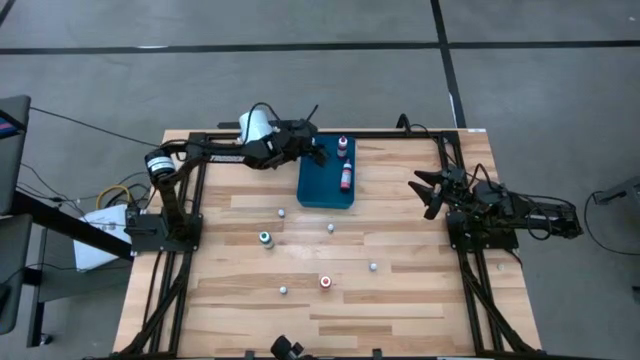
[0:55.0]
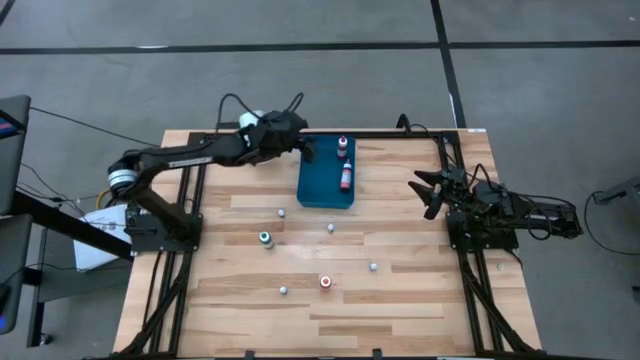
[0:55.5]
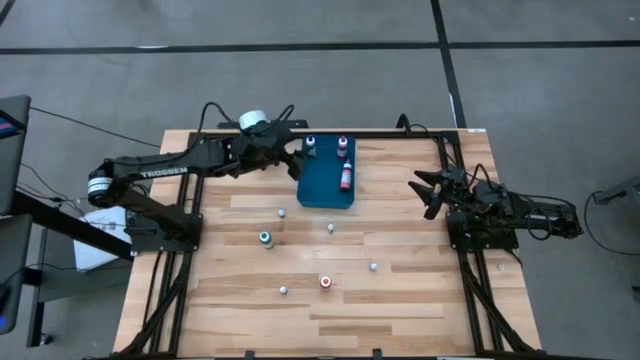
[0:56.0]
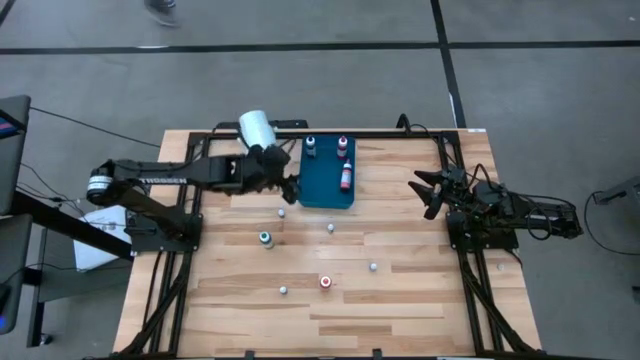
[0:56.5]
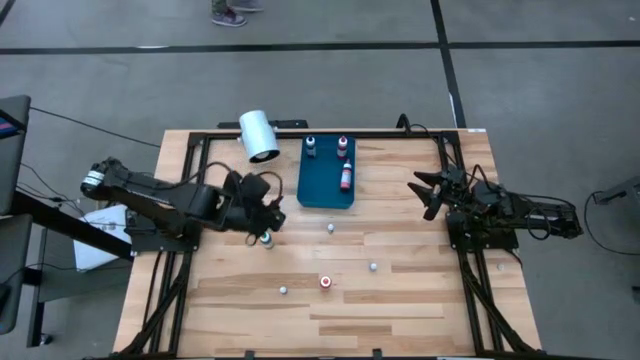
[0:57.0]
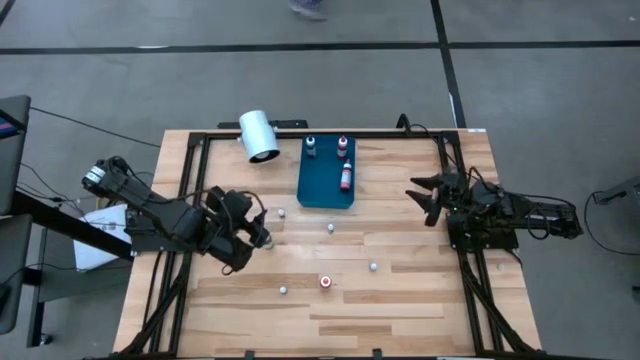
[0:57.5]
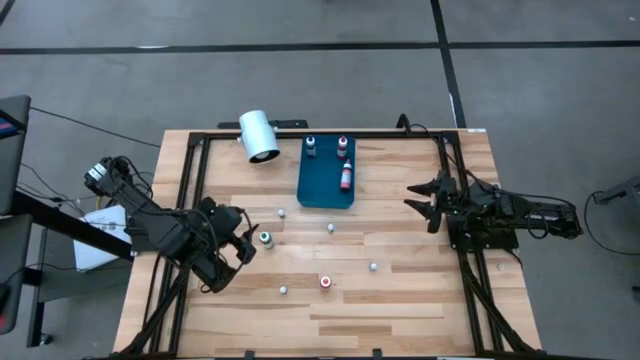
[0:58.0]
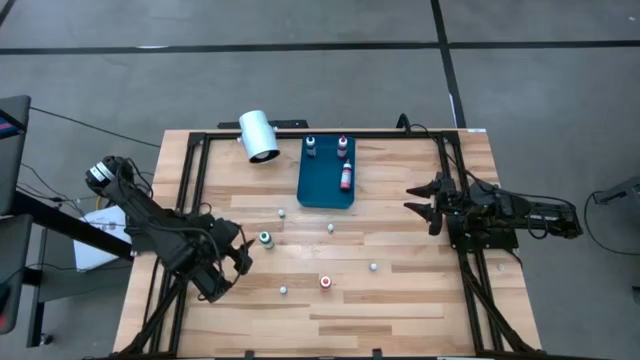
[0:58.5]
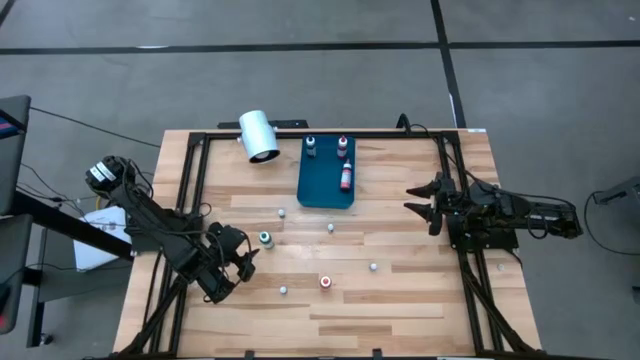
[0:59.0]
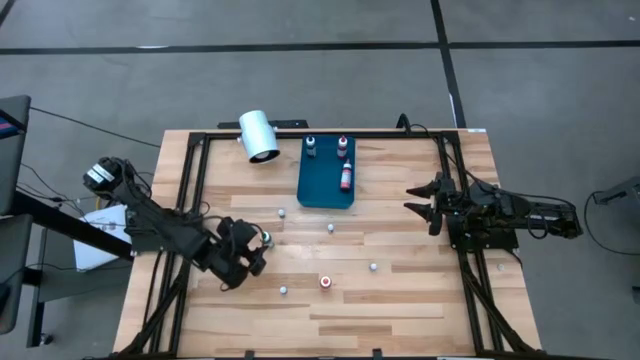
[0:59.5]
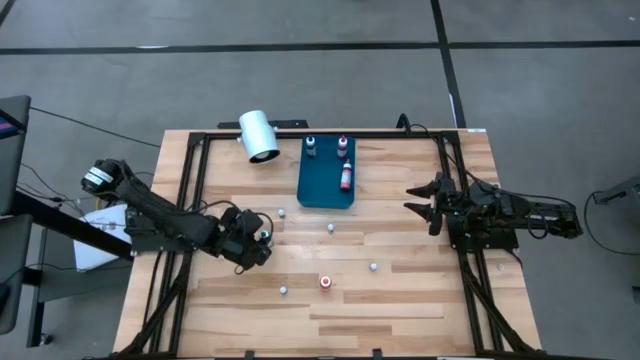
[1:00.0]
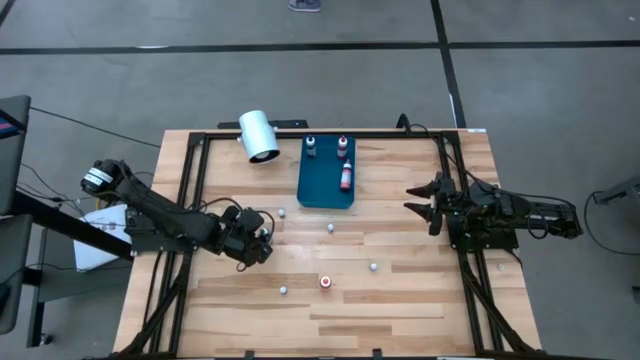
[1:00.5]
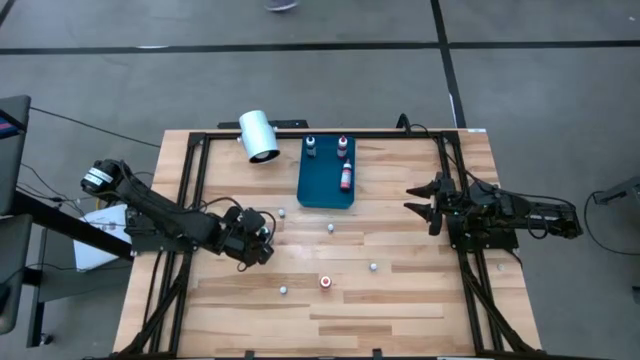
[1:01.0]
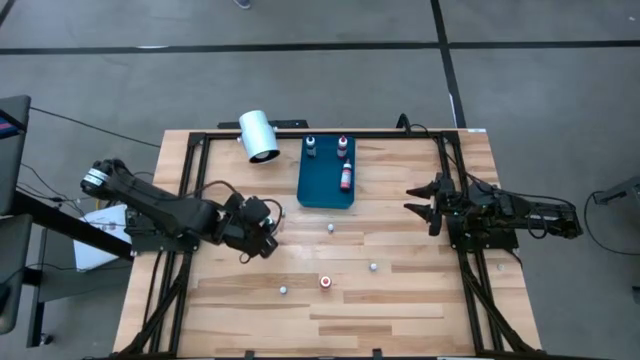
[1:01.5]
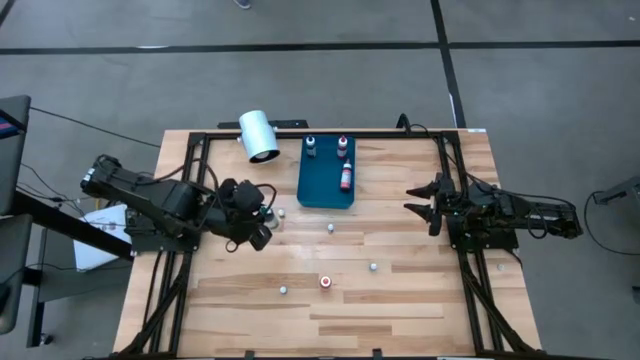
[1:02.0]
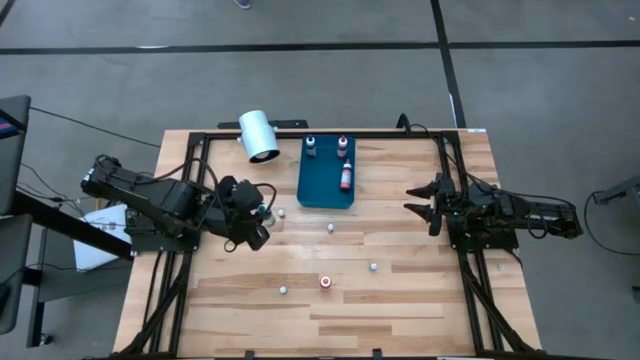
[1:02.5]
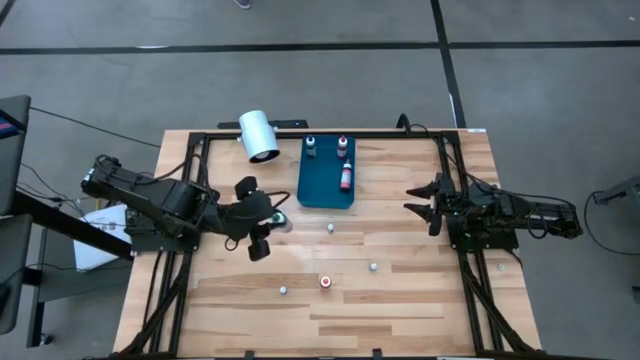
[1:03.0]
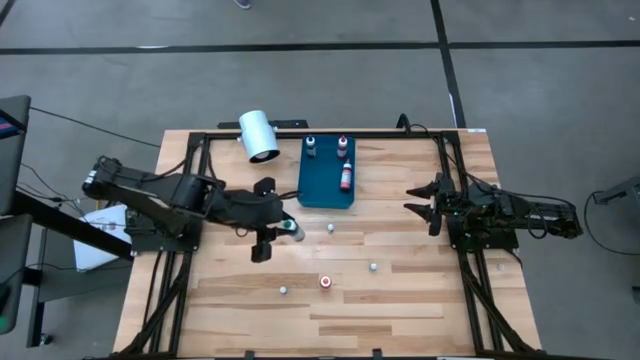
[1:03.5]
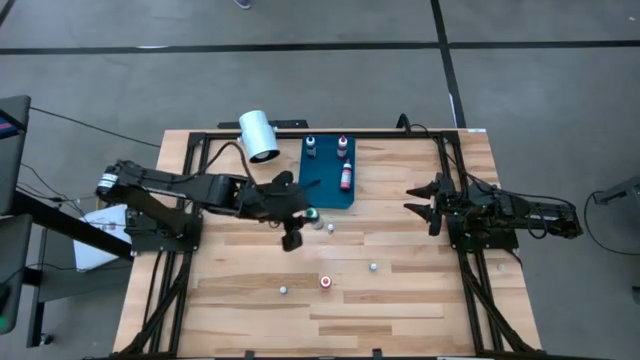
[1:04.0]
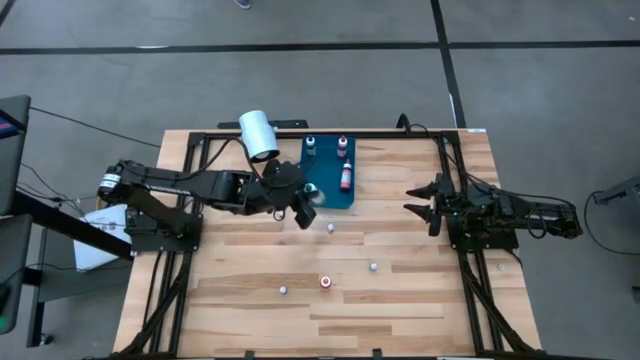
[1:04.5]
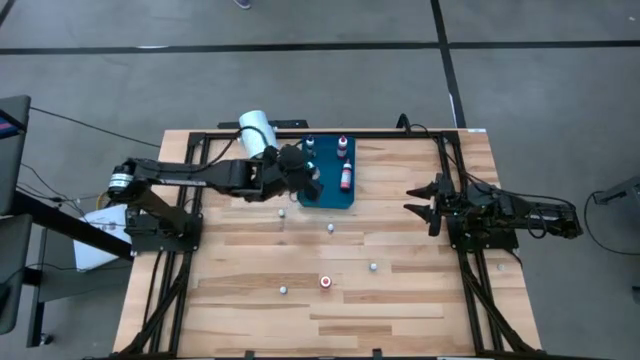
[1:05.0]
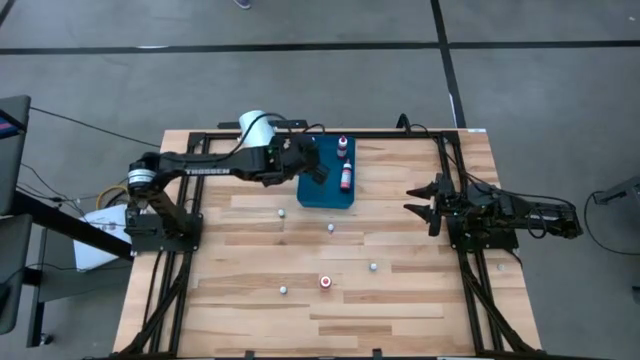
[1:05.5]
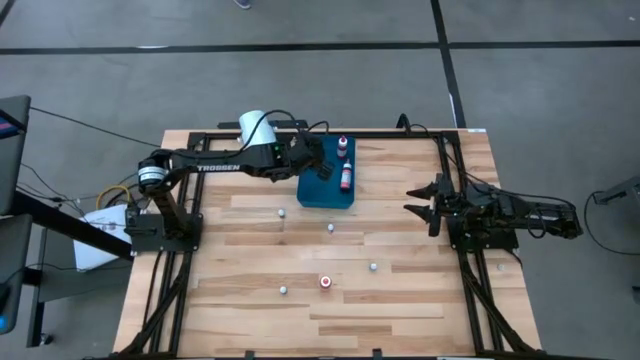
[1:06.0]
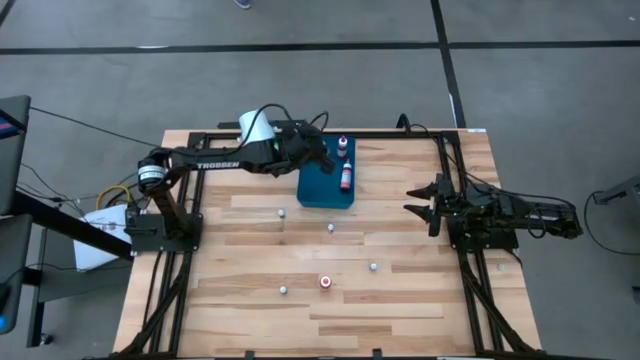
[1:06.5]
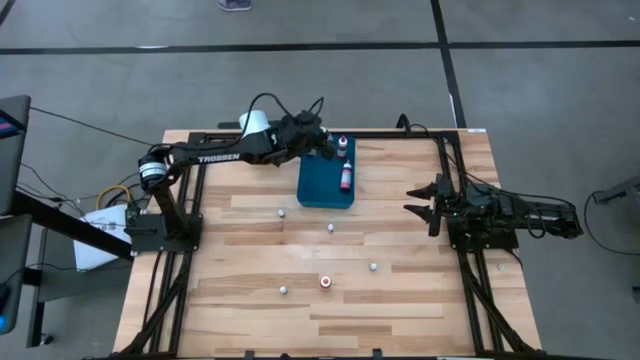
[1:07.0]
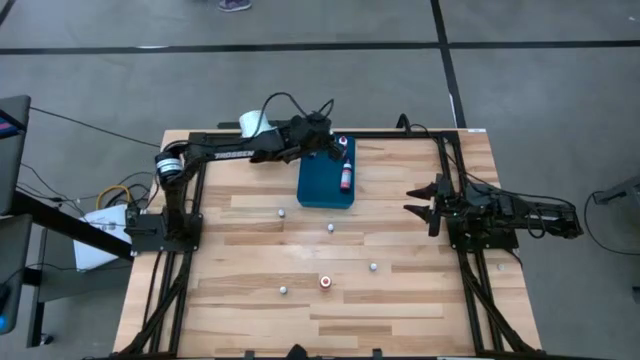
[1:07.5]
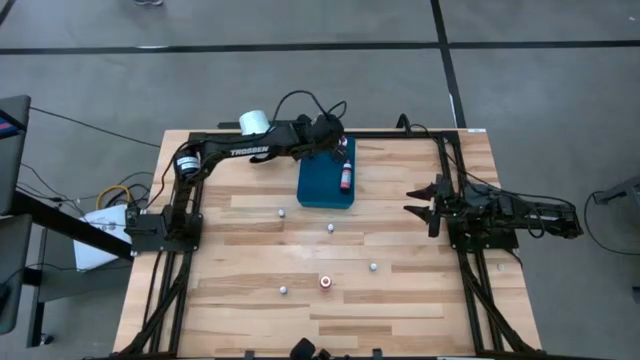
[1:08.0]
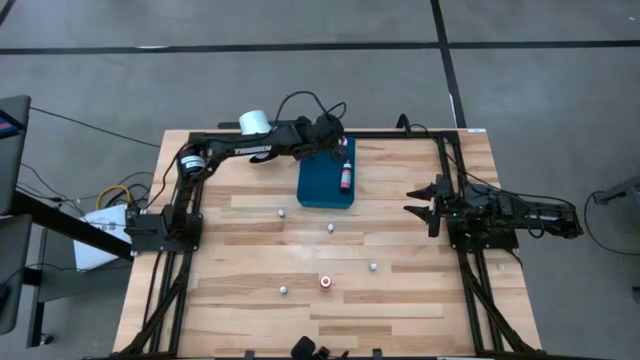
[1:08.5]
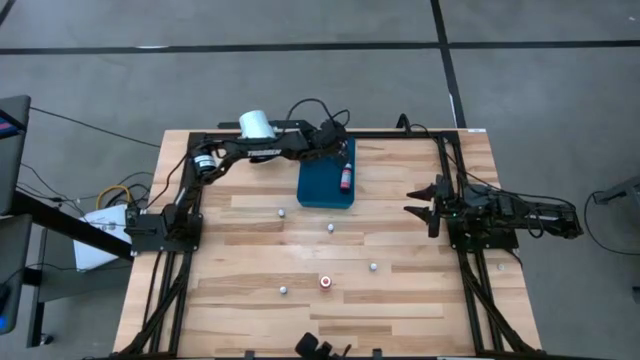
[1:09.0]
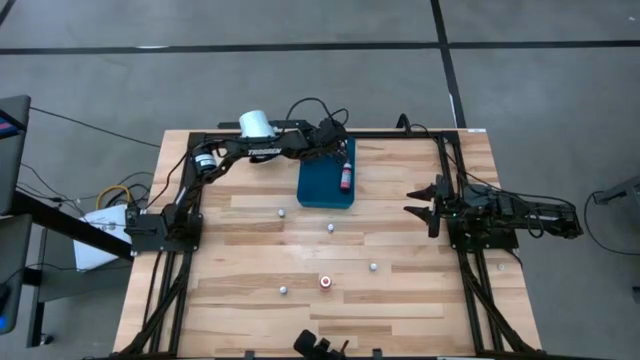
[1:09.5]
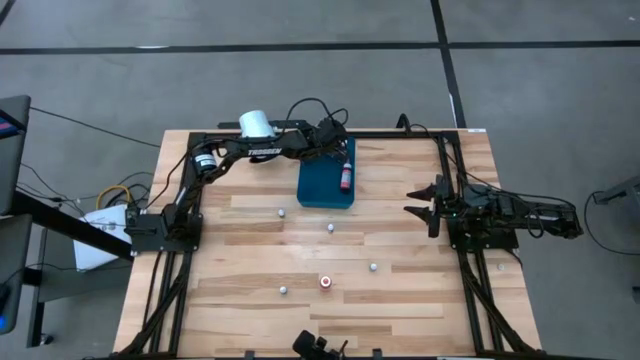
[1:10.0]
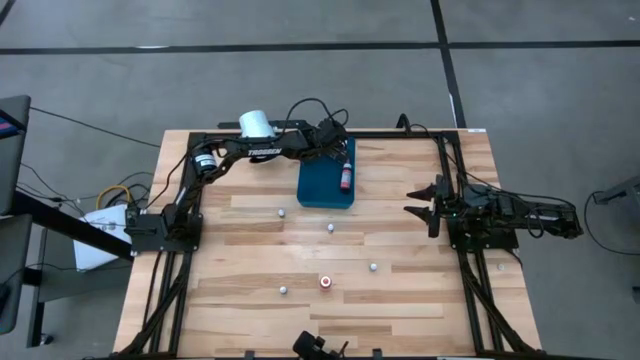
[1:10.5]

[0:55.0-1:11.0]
Task: Pick & Place food coloring
Put the large green food coloring bottle into the blue bin

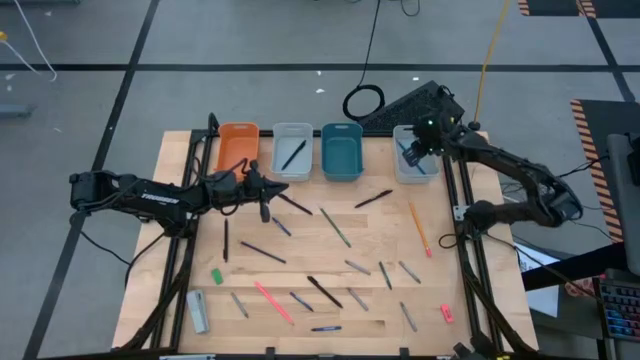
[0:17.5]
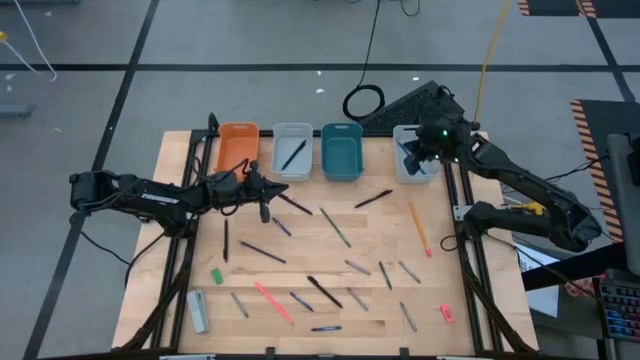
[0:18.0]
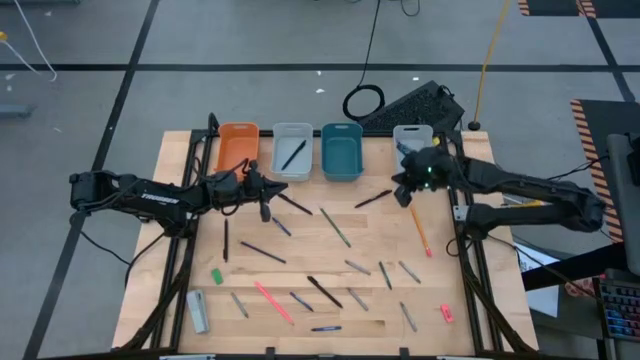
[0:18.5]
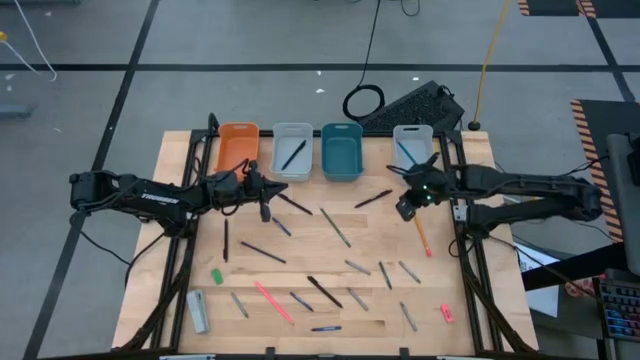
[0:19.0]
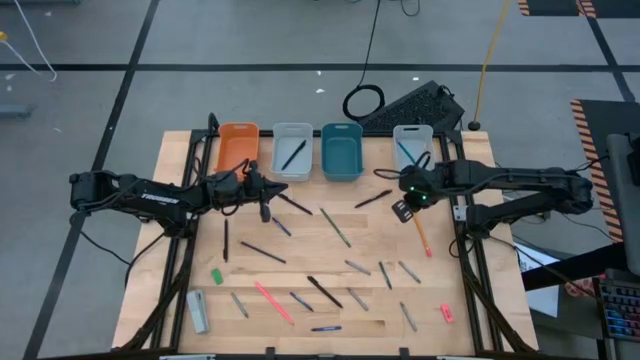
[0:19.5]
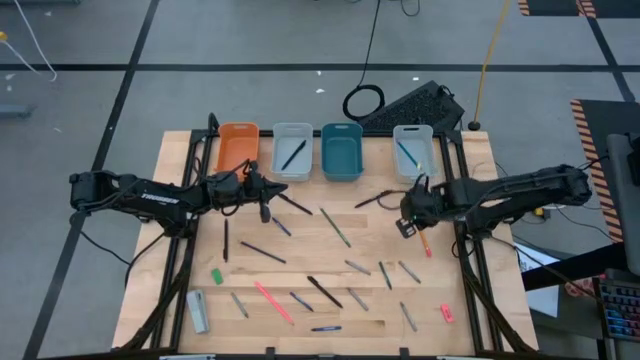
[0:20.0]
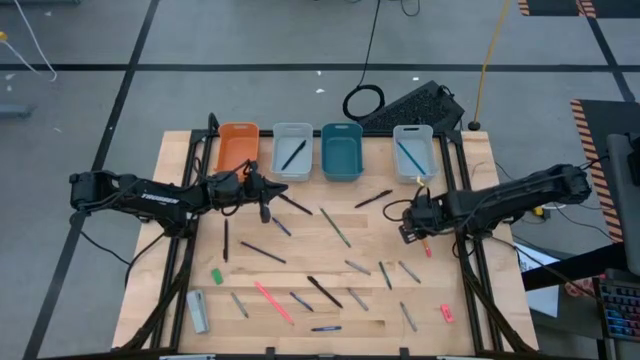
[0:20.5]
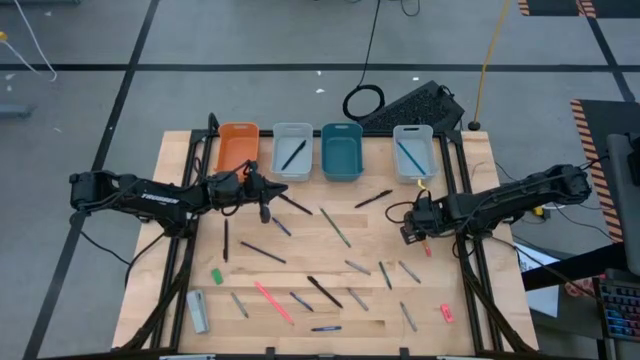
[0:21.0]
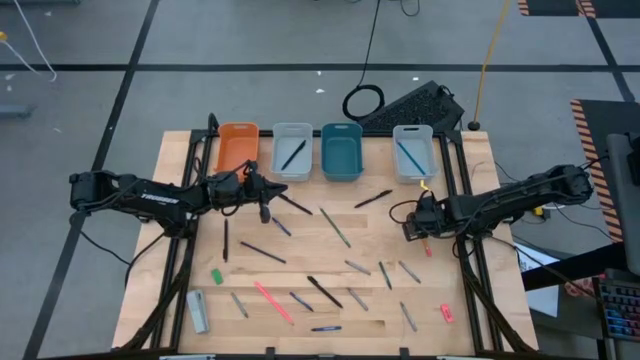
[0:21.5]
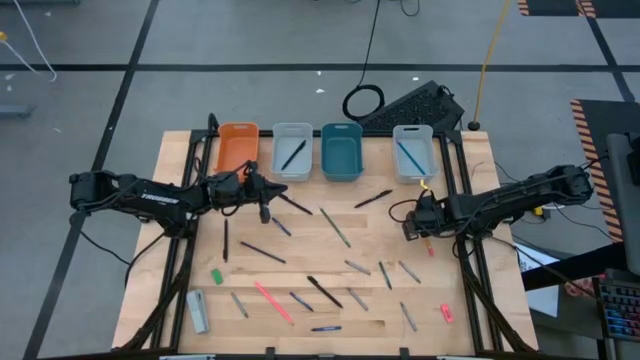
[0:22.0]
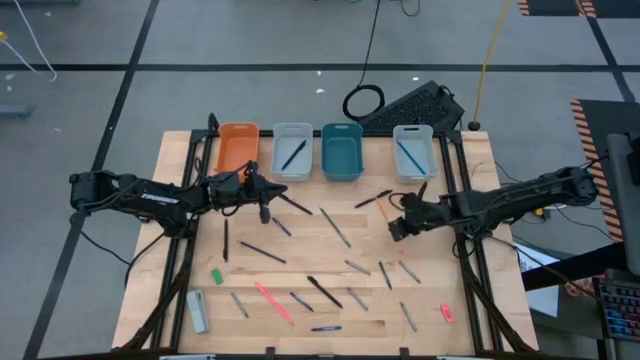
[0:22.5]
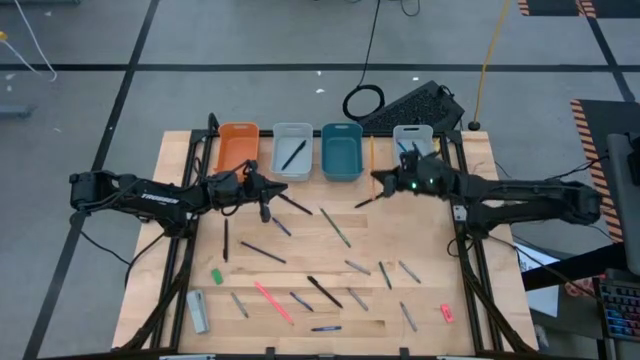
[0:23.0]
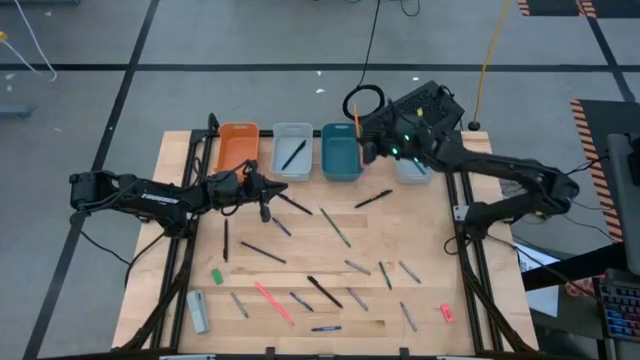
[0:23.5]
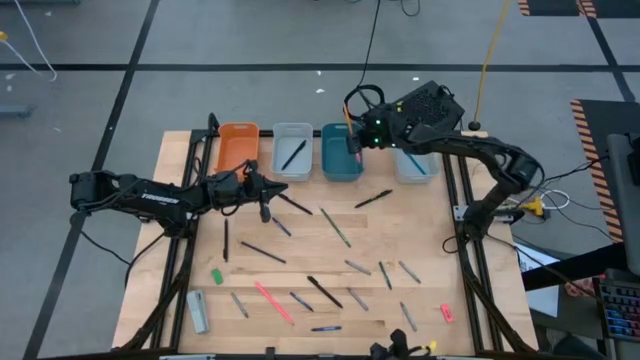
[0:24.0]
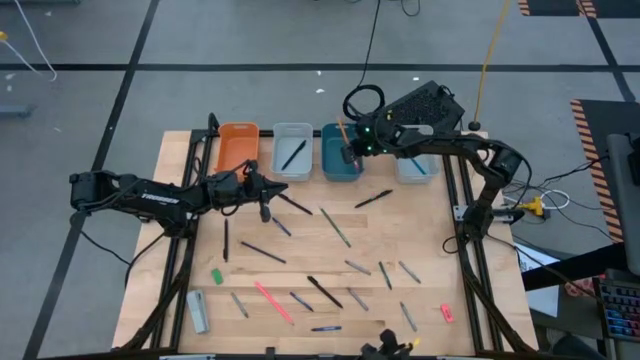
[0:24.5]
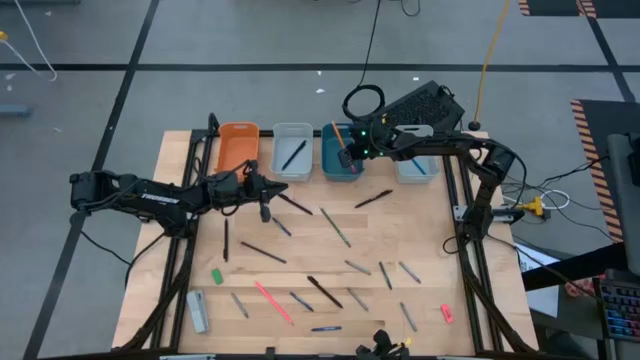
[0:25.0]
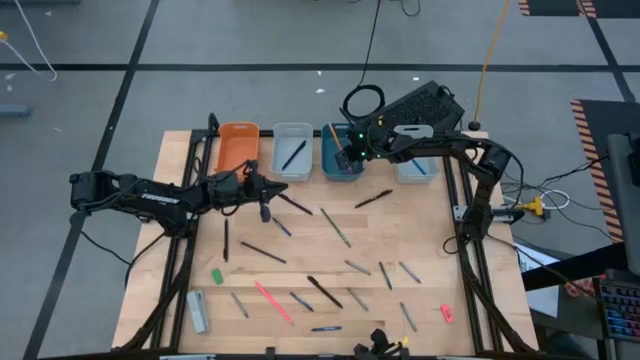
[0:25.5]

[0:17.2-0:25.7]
Task: Sort crayons/erasers/pens/pencils in bins
Put the orange pencil into the blue bin
